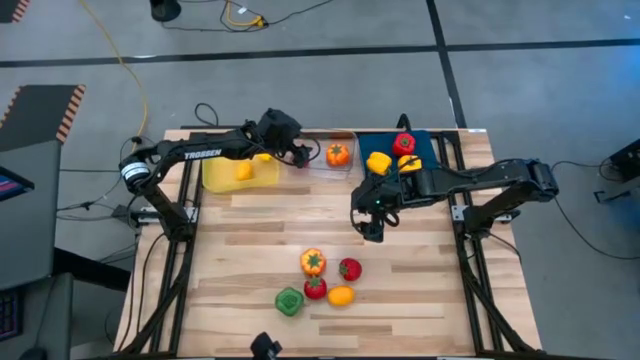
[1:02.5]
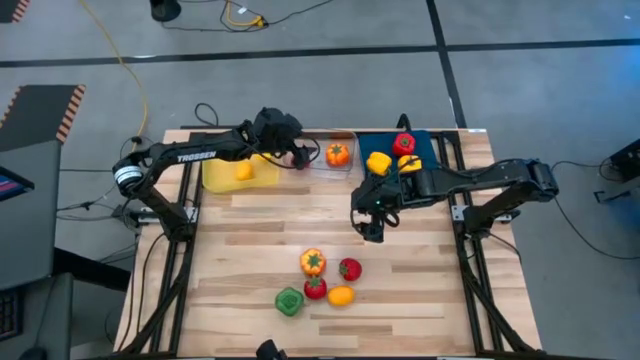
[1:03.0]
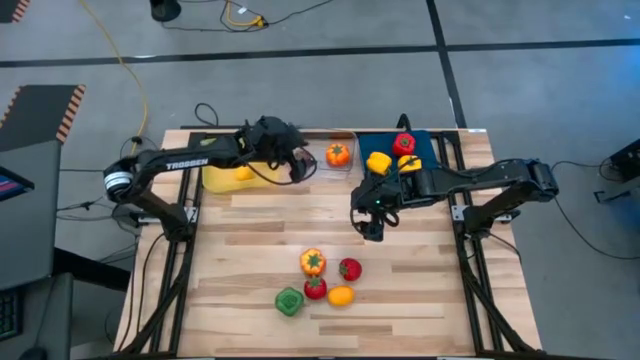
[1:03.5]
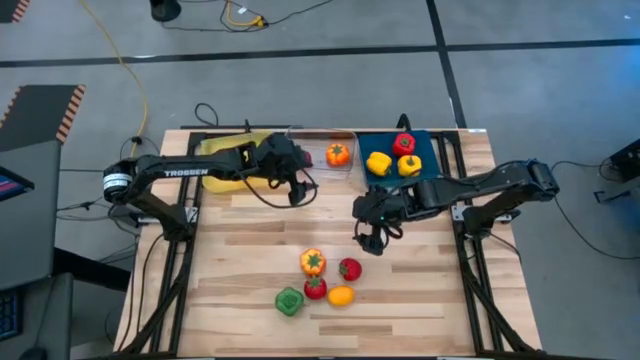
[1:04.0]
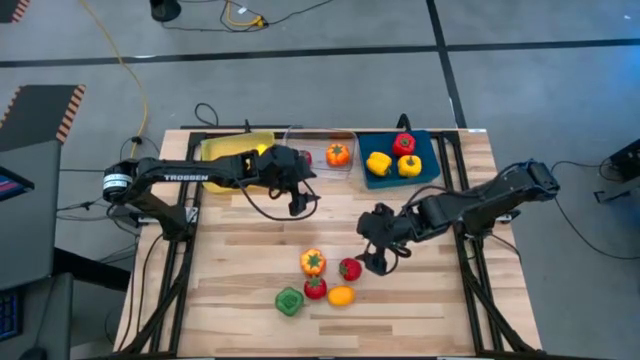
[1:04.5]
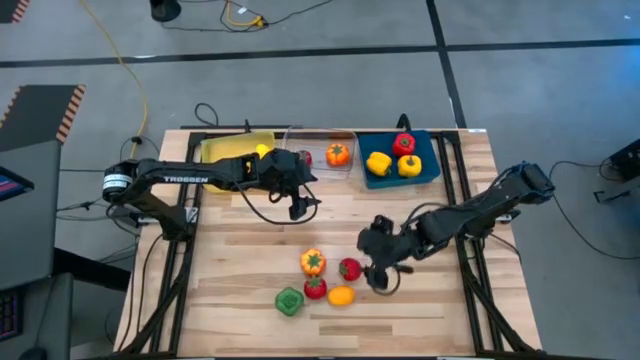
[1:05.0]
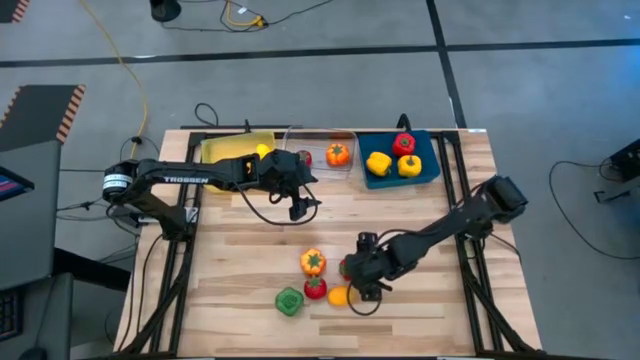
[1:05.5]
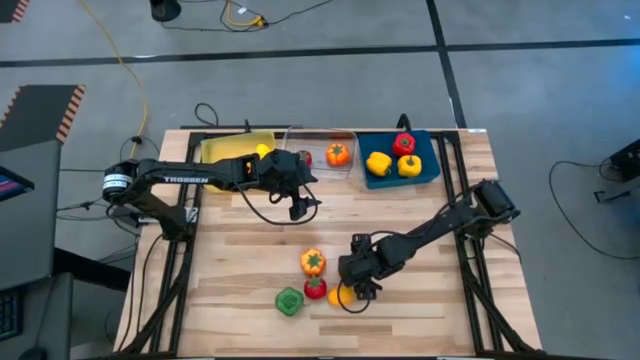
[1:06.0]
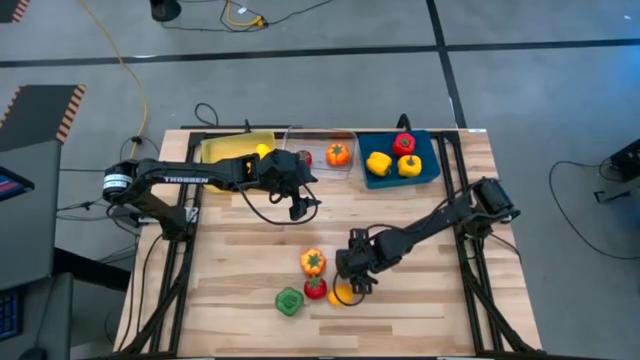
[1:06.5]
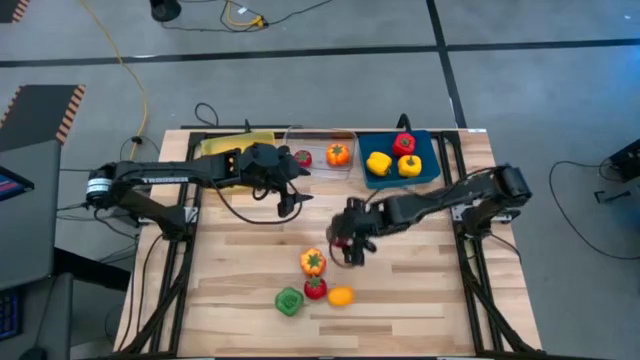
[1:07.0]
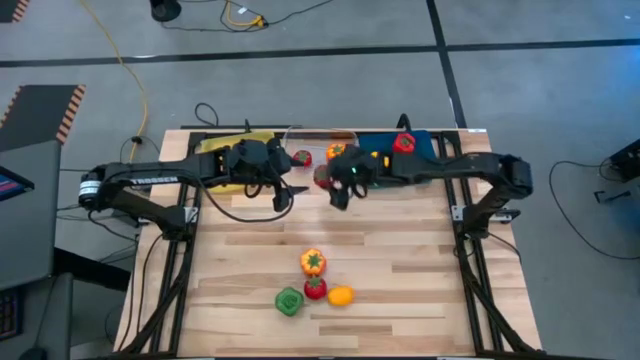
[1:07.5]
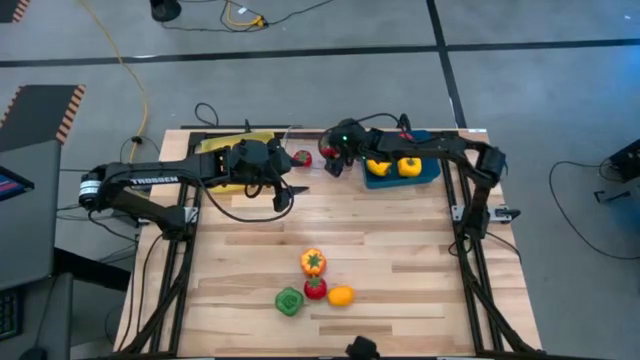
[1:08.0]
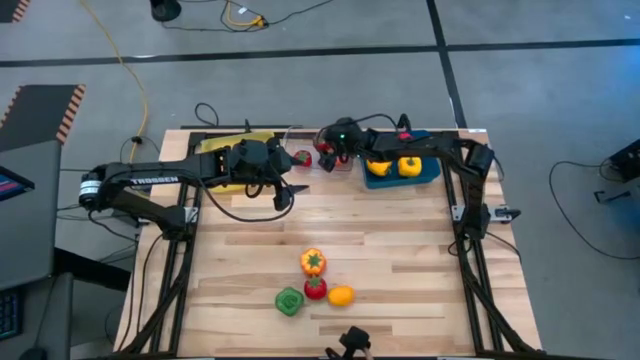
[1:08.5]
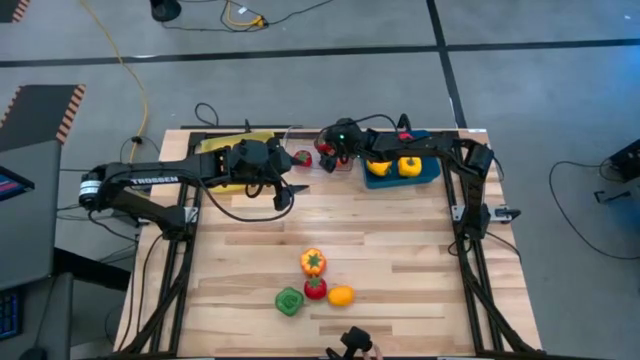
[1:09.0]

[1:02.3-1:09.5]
Task: Sort produce into baskets
Put the right red tomato into the transparent bin

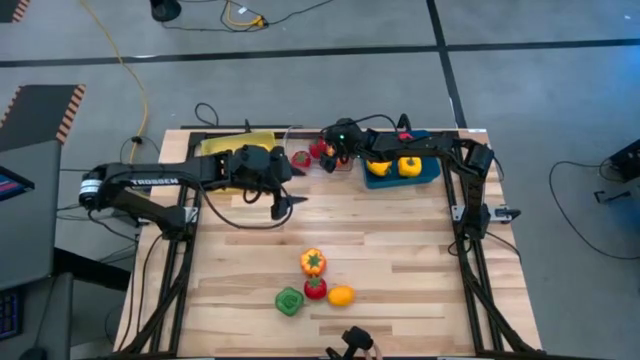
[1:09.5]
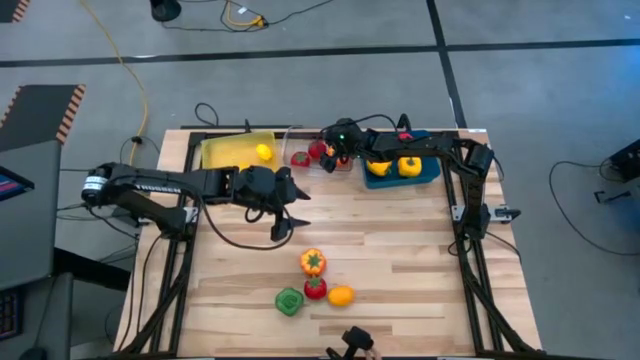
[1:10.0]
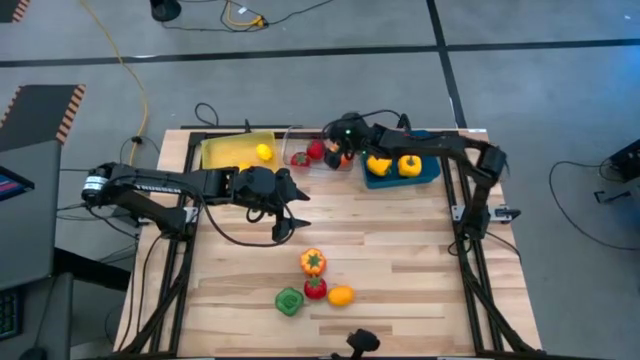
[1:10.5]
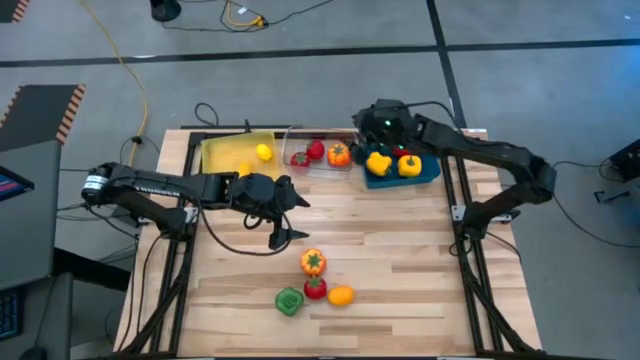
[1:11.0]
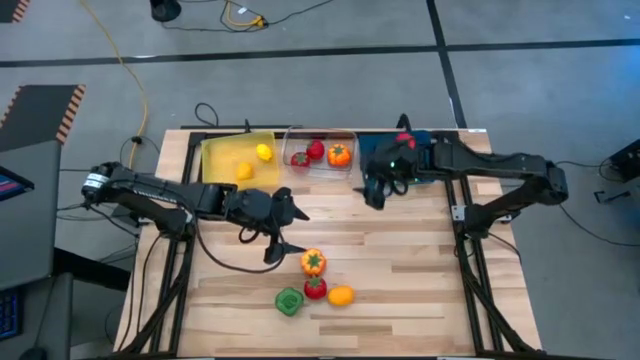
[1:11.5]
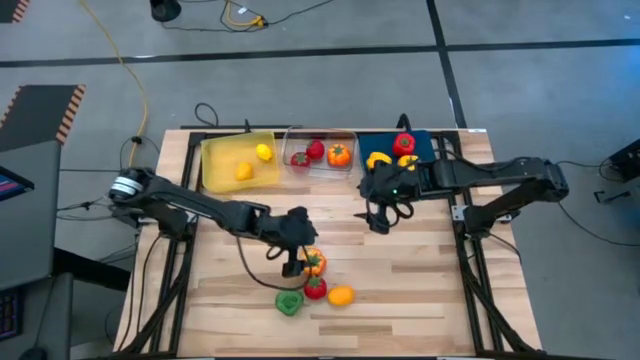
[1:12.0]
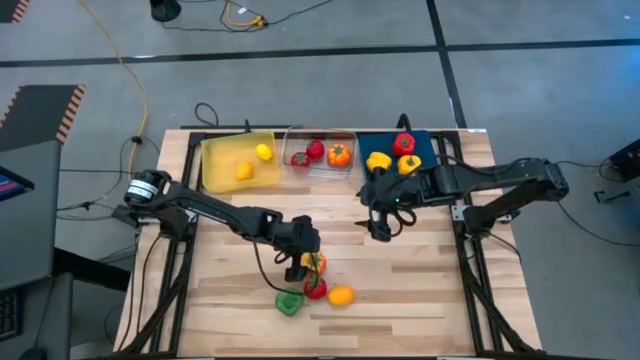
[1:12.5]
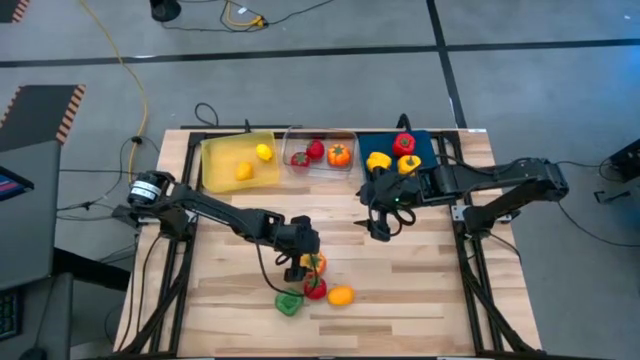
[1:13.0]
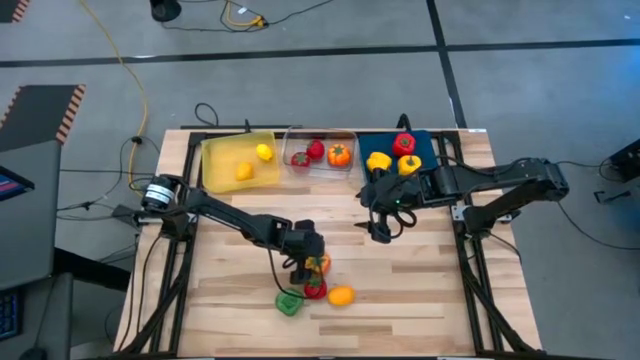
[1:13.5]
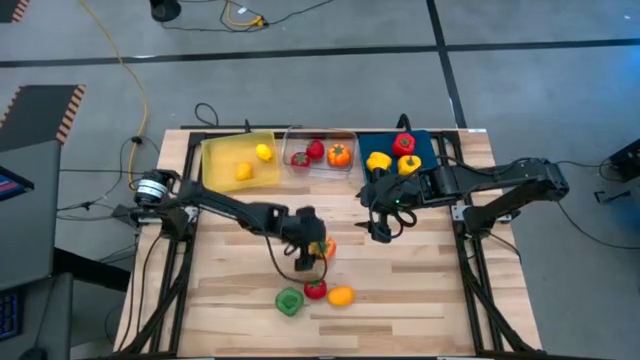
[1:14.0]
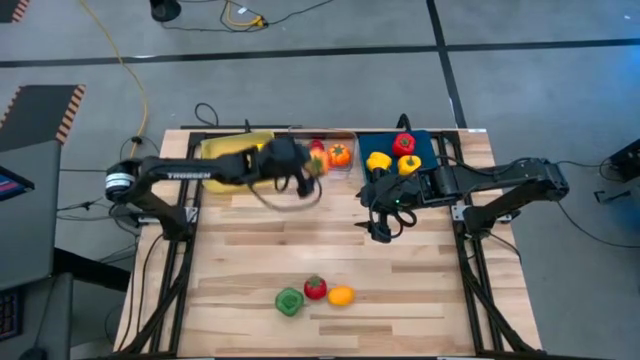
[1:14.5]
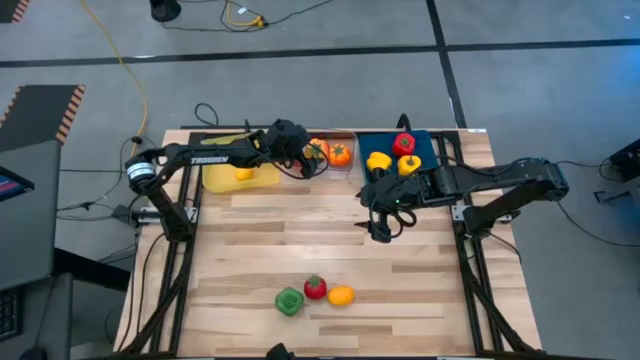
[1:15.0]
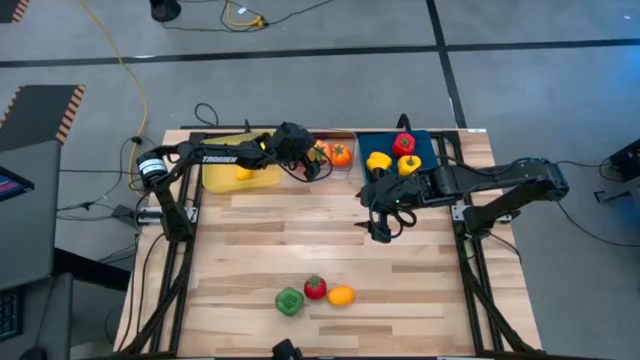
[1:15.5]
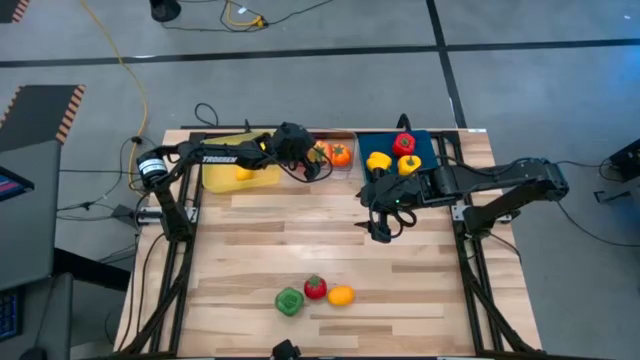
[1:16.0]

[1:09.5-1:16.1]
Put the orange tomato into the transparent bin

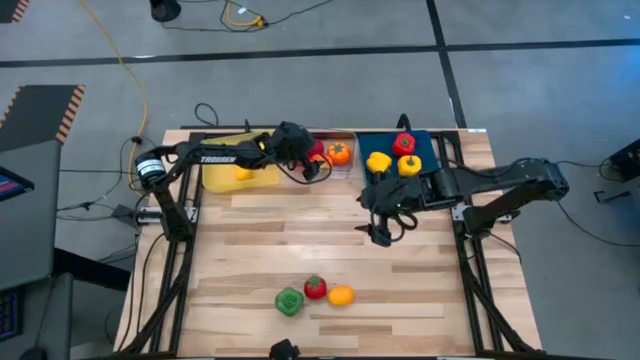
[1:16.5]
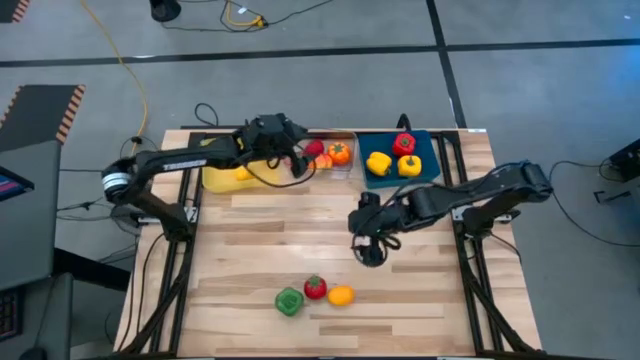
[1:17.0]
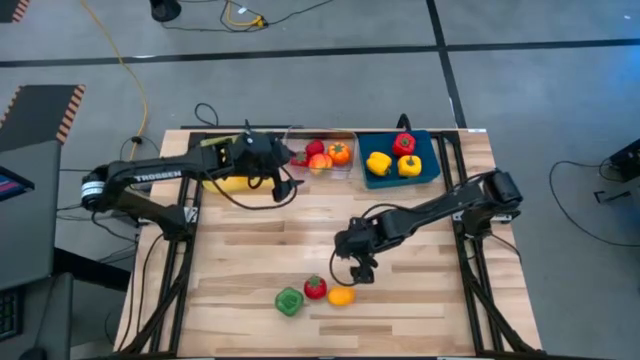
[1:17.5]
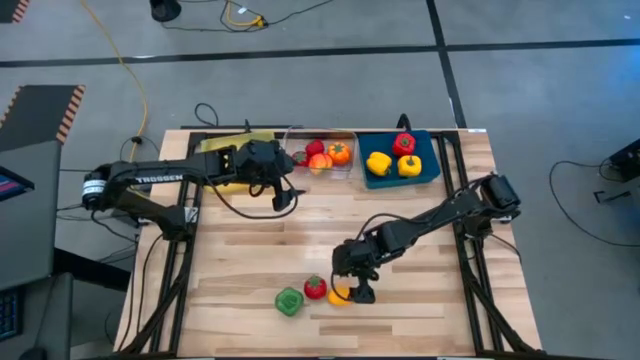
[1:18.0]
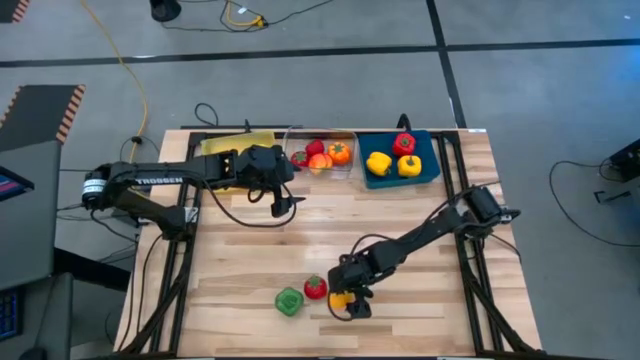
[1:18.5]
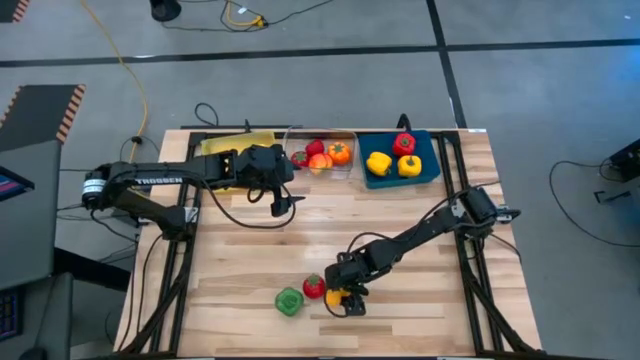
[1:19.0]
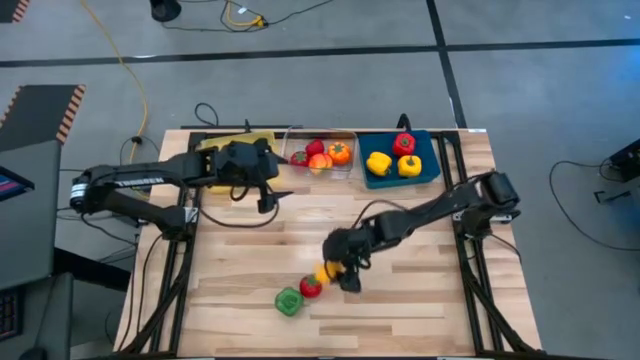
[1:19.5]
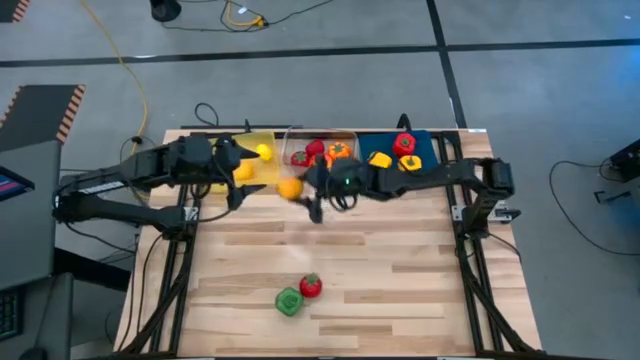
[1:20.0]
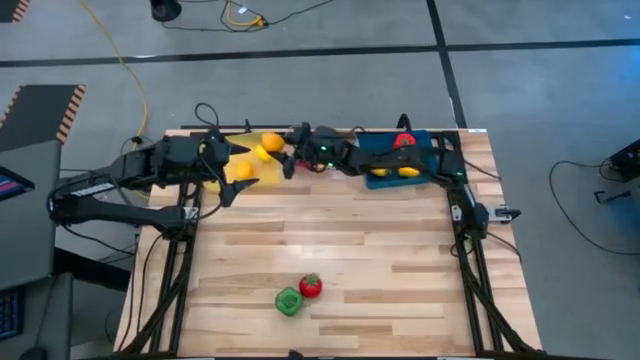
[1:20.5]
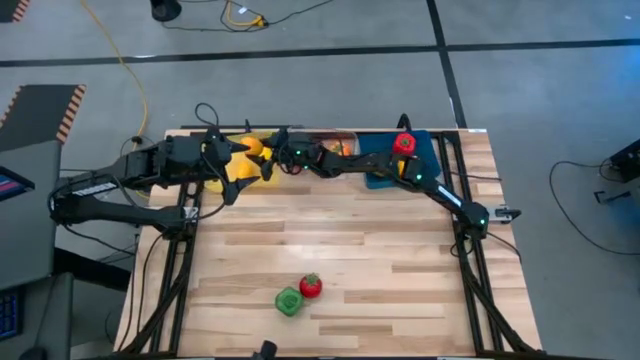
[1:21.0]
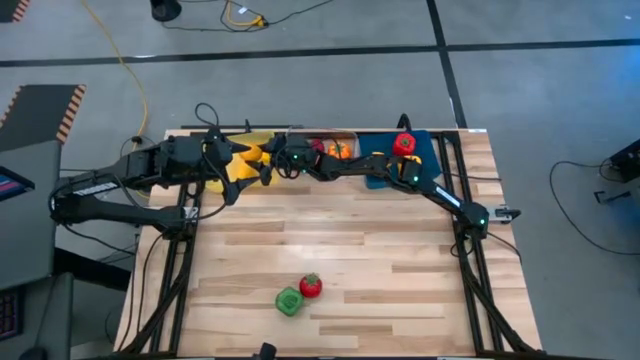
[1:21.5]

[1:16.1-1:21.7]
Put the yellow lemon into the yellow bin
